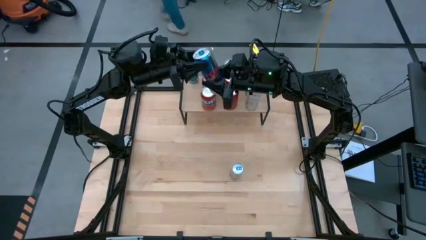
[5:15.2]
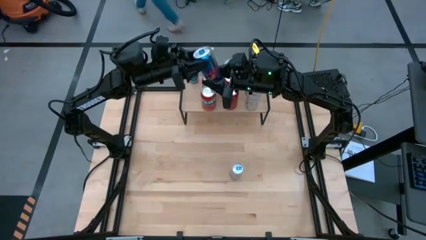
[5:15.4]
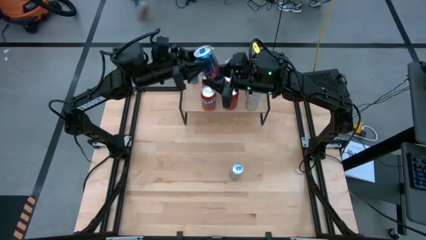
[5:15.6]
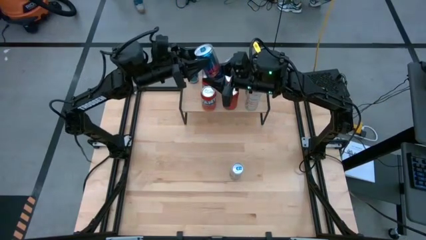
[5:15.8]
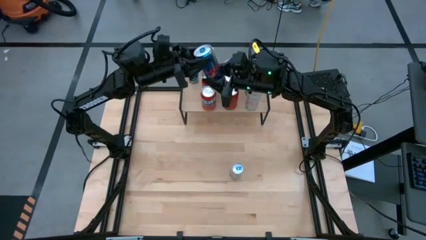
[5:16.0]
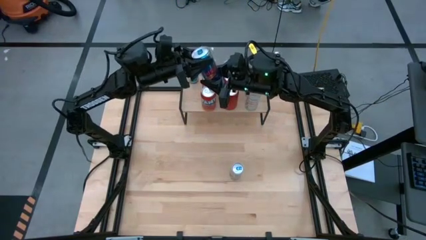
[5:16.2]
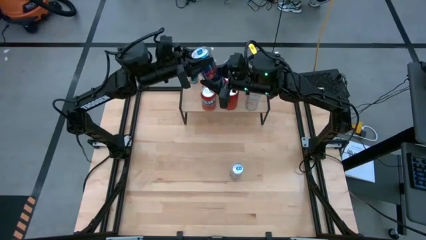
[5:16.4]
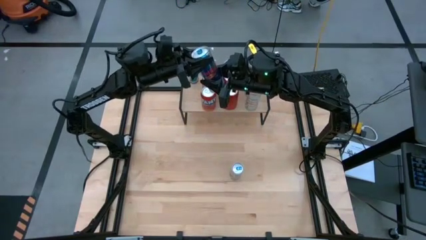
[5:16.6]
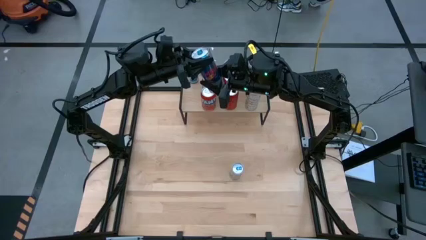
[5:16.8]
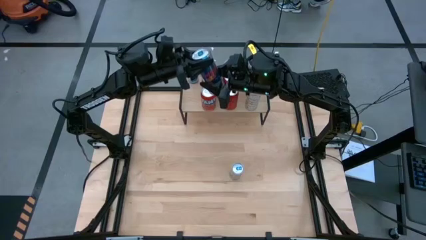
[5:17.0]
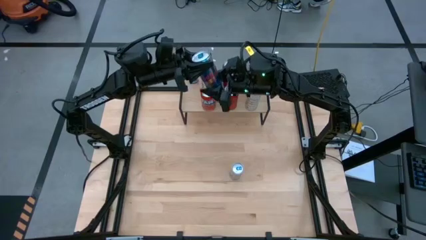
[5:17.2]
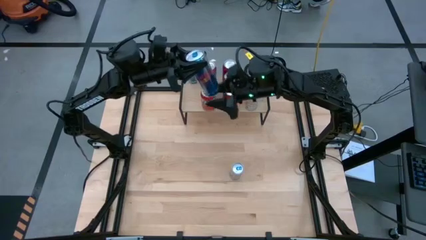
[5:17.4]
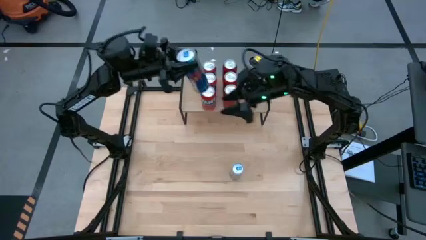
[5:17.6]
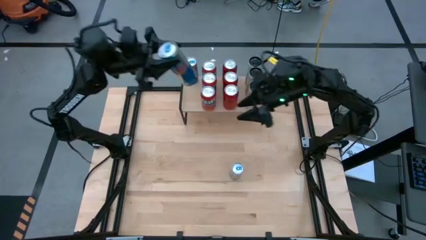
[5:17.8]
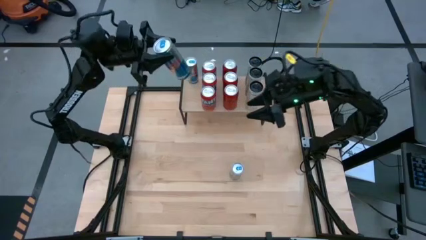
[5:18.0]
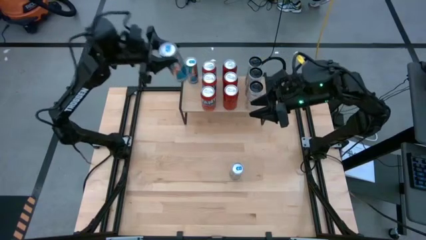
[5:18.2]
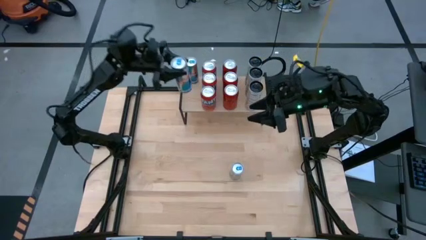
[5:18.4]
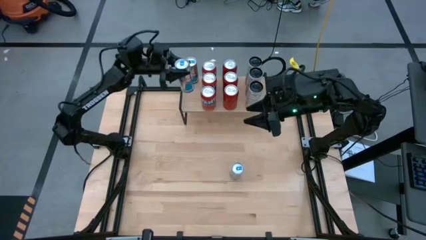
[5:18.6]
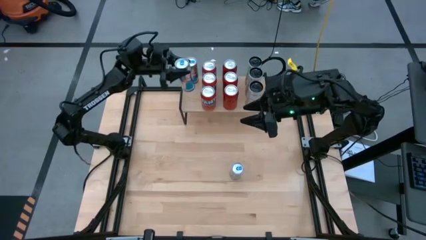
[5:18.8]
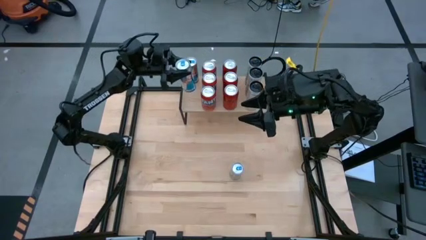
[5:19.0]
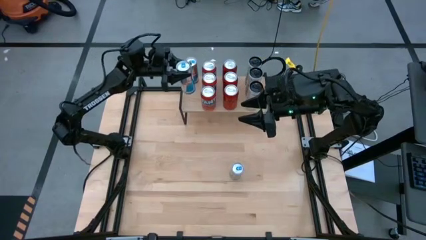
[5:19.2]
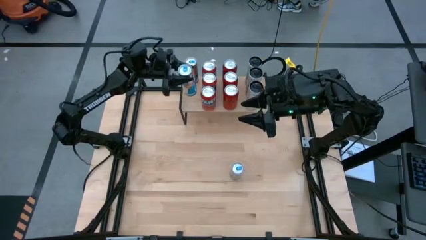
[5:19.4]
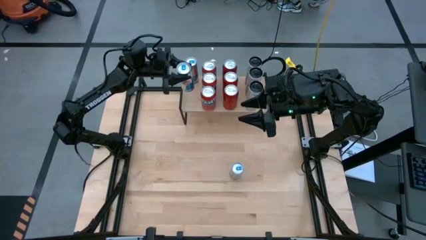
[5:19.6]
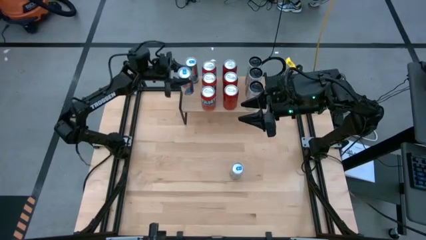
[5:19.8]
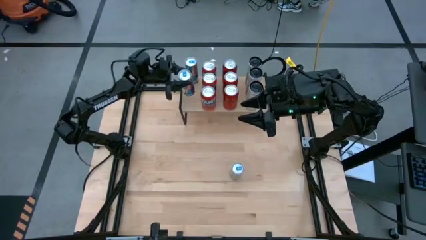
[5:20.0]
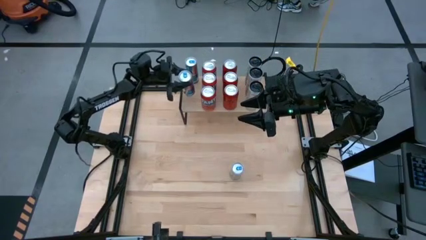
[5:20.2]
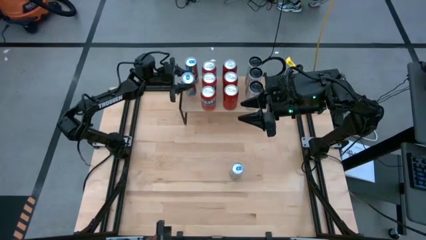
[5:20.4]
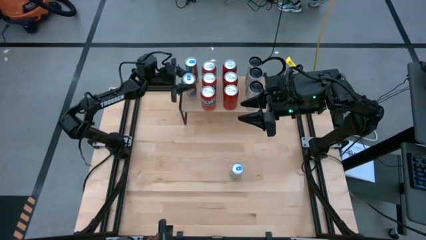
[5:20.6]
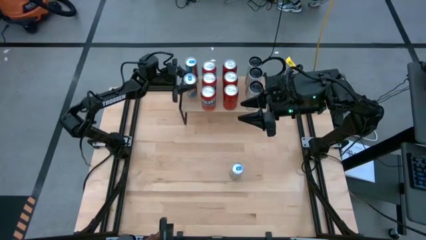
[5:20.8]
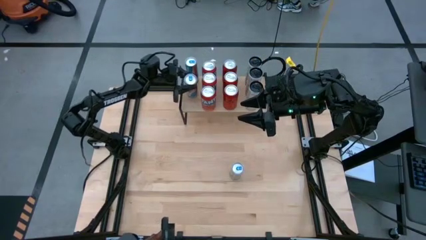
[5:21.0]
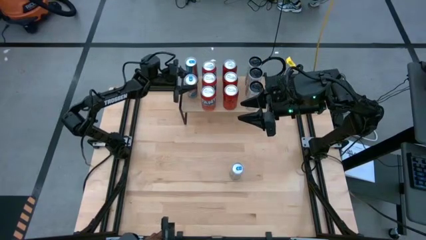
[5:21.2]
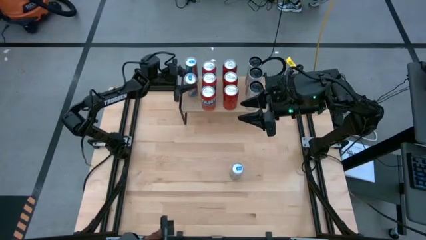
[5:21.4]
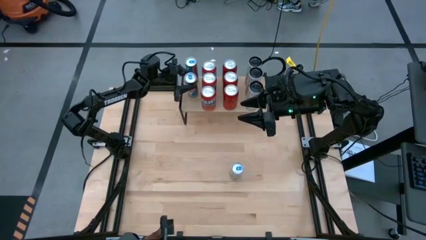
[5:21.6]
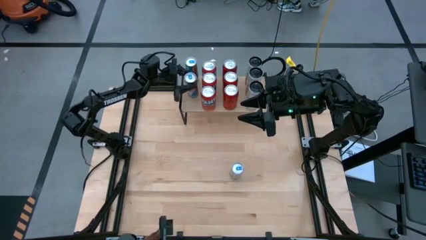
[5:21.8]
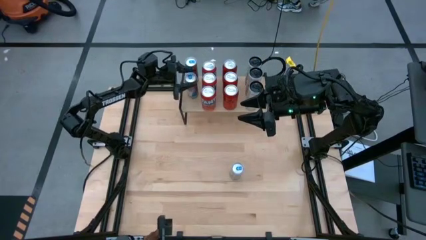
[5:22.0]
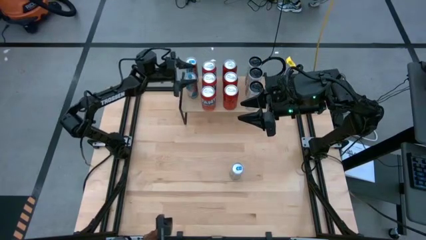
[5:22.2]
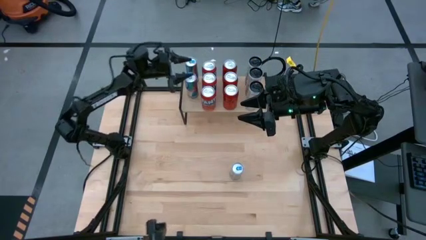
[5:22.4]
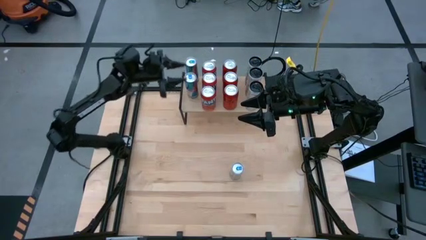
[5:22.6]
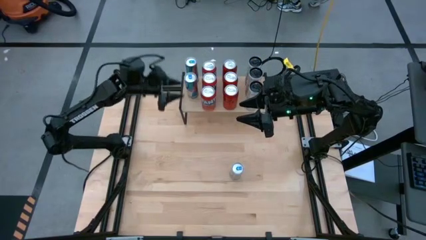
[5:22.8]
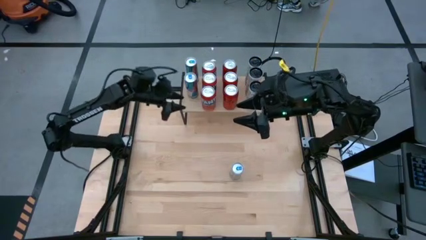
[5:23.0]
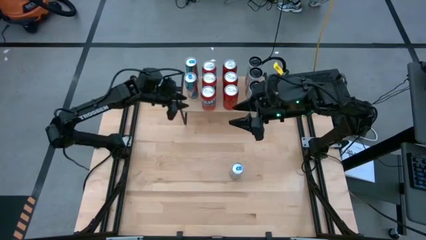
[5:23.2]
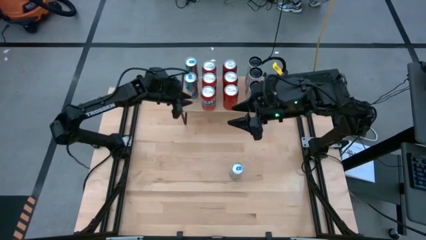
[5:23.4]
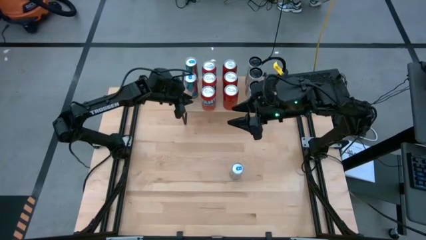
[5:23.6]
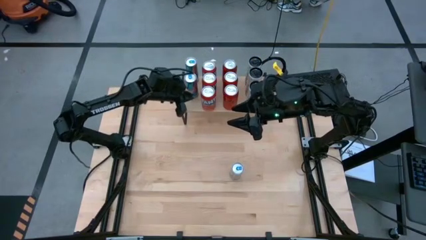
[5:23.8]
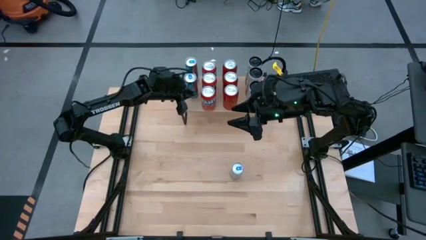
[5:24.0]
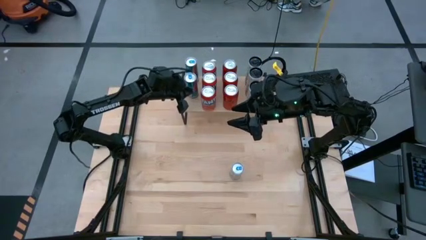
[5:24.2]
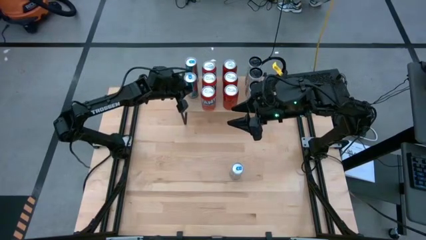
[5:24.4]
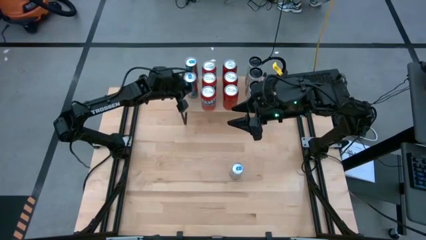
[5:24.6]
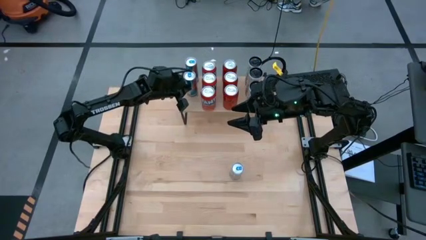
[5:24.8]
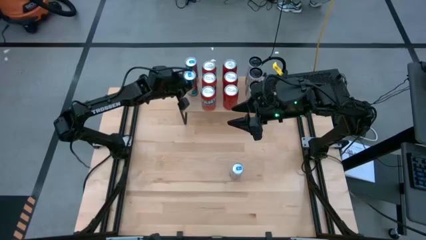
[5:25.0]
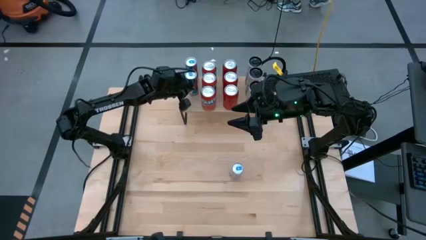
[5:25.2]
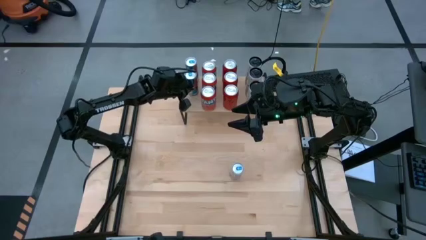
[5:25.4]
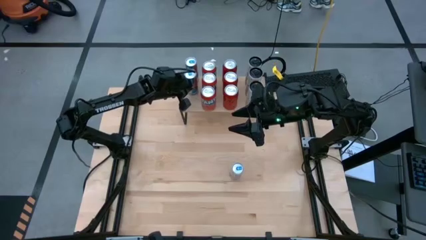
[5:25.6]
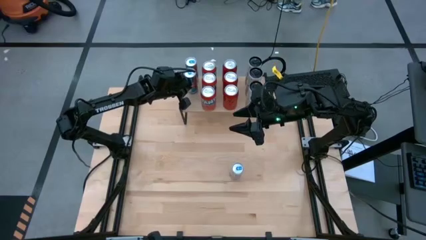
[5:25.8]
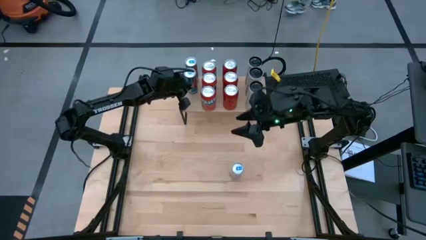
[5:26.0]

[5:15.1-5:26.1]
Task: Place canned beverage on shelf
Put the top blue soda can on the shelf aligned with the other blue soda can

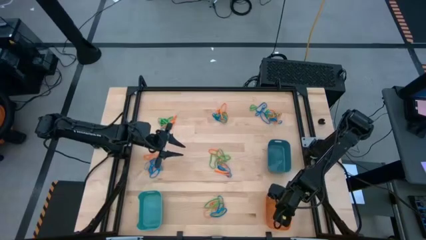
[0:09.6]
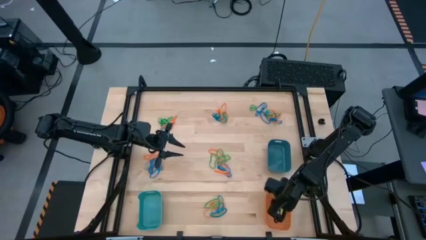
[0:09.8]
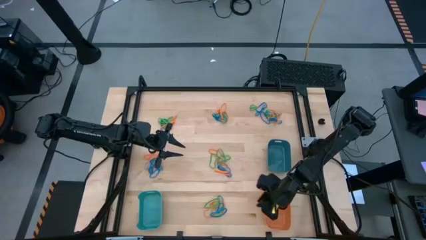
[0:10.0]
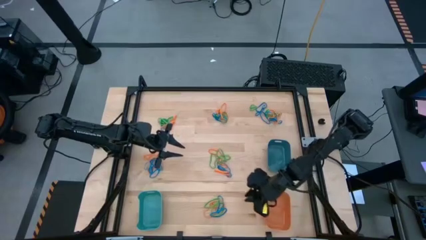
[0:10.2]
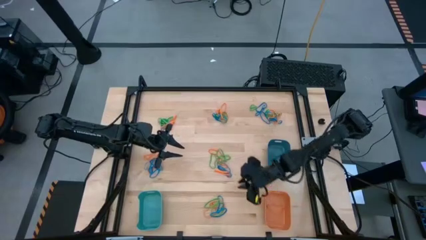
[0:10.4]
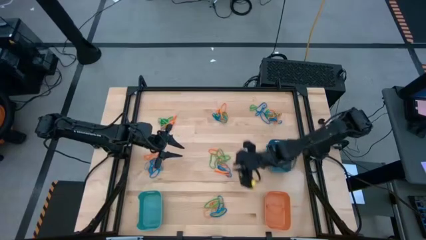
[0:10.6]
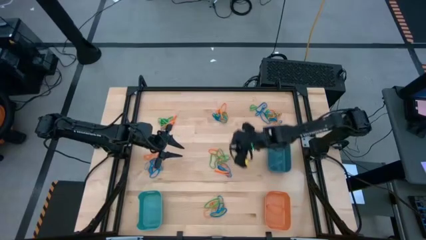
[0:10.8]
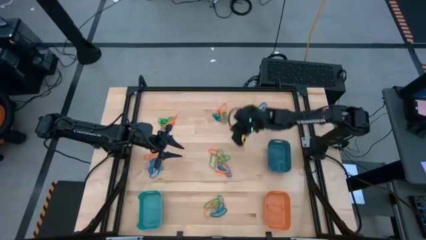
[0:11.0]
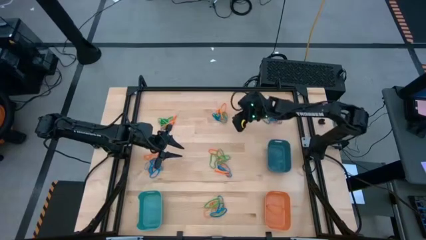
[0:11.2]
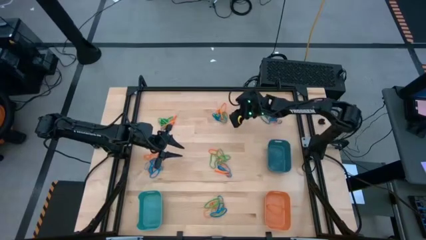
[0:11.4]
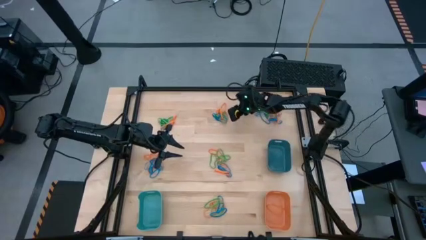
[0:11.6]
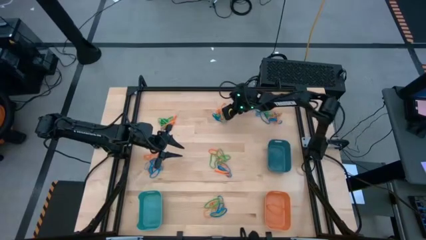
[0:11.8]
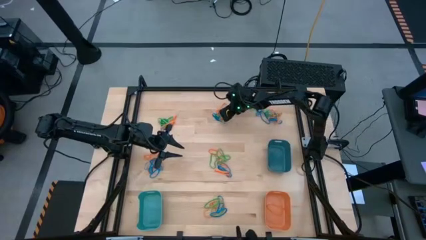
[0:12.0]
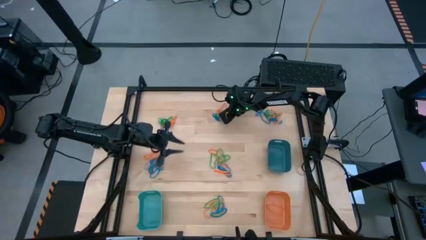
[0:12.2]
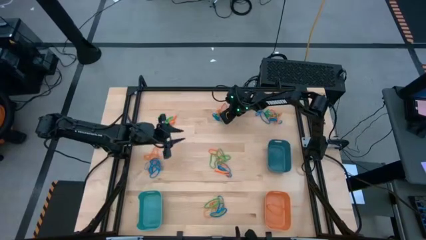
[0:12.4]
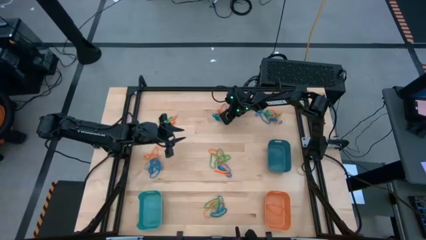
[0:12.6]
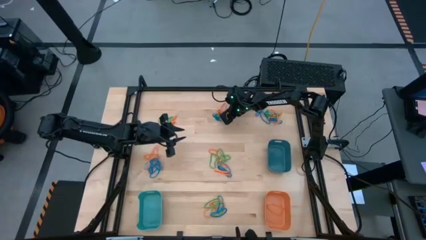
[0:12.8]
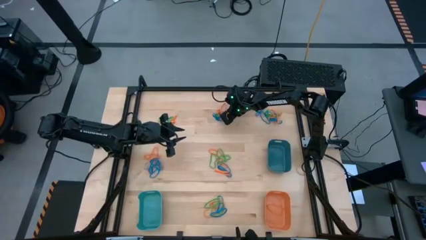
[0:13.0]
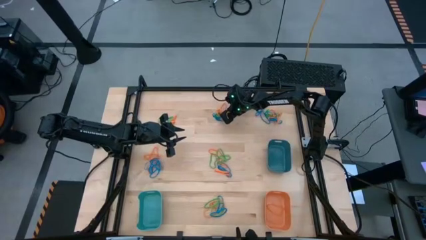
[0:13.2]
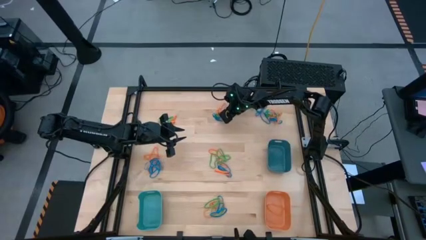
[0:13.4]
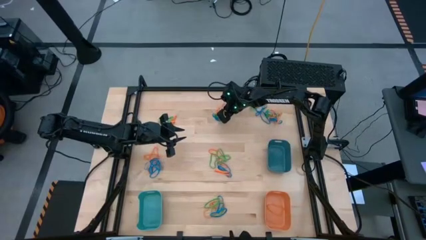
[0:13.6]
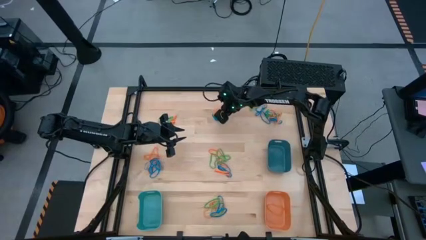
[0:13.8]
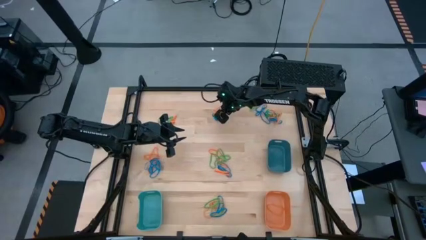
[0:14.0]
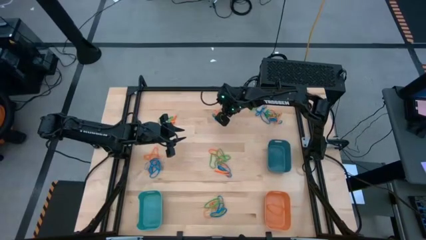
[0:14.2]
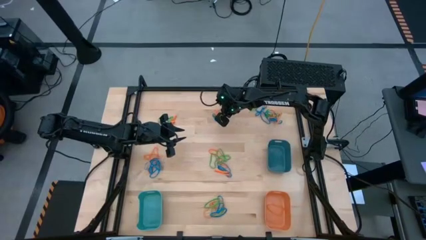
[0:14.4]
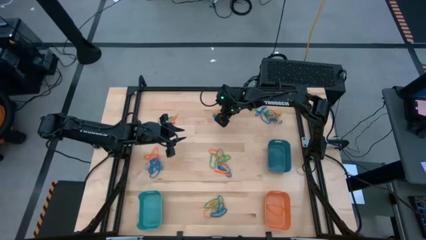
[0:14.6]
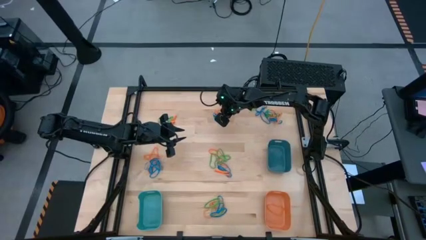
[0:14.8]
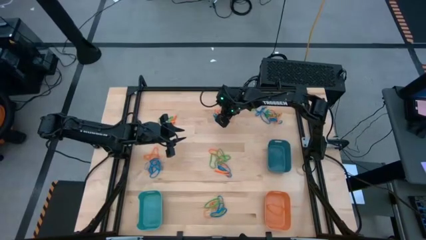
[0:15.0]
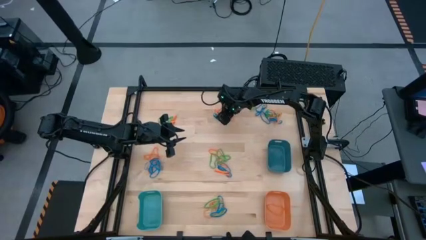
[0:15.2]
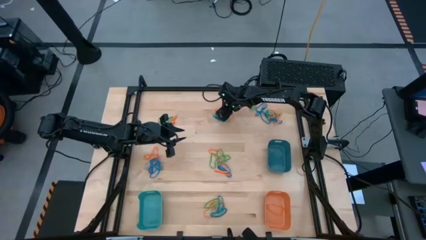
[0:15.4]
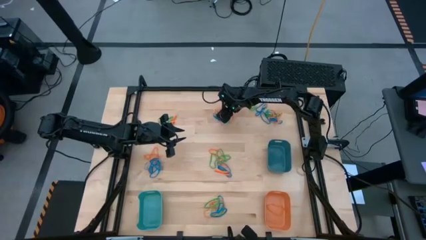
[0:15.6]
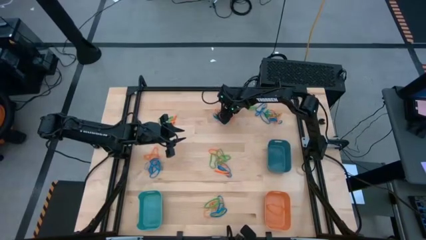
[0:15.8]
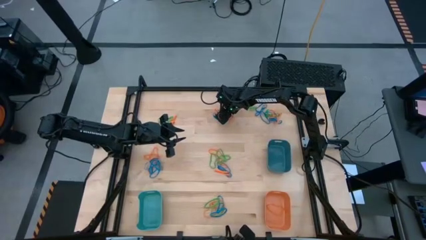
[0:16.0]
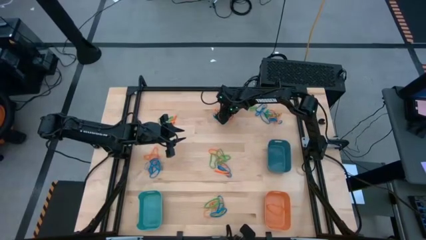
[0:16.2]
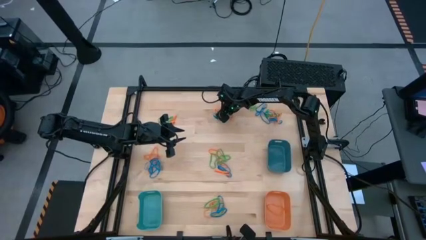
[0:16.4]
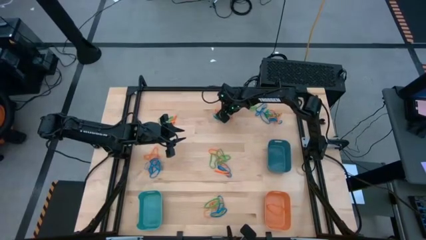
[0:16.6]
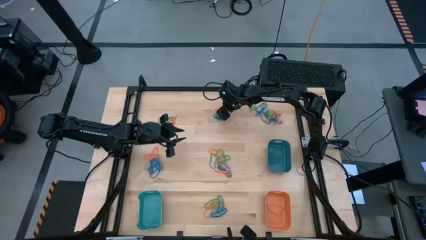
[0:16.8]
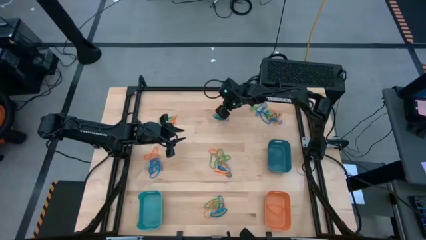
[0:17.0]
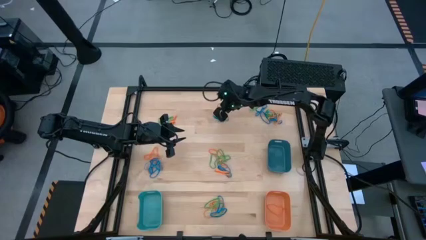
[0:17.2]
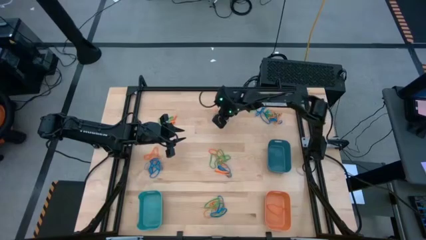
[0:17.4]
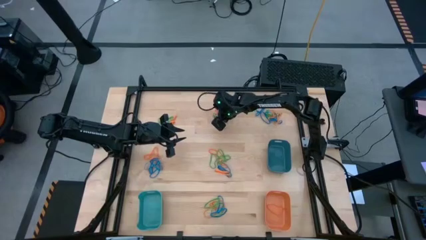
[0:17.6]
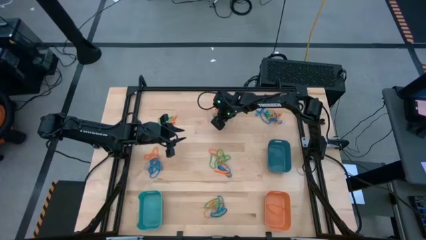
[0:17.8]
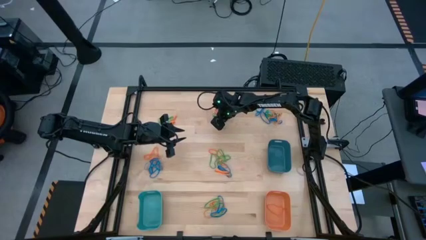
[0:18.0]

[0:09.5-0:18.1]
Task: Sort rubber bands into baskets
Put the orange rubber band into the orange bin
